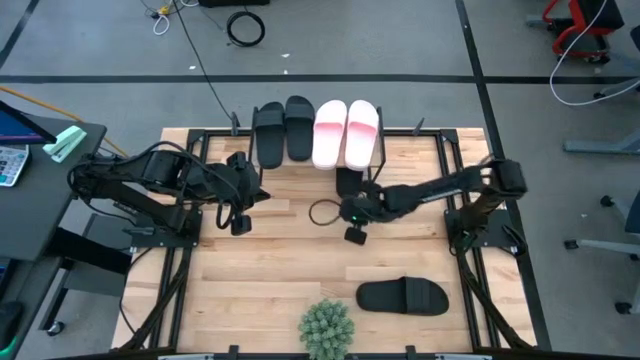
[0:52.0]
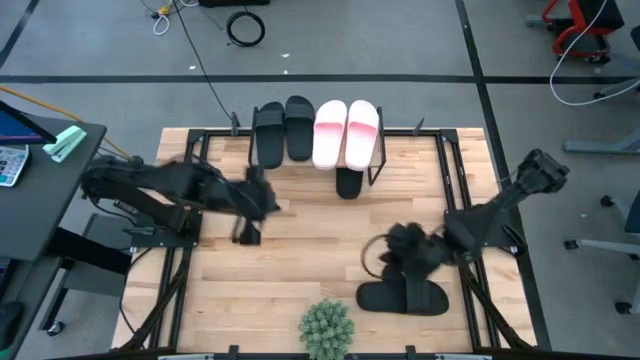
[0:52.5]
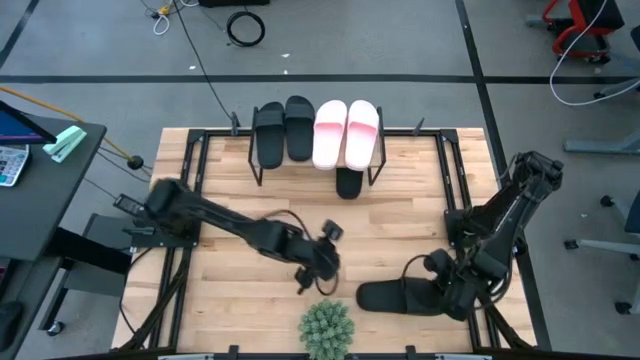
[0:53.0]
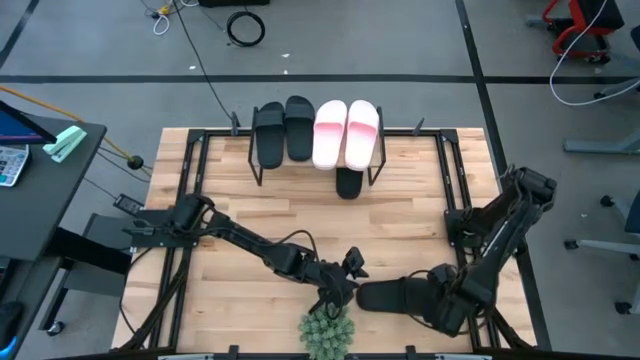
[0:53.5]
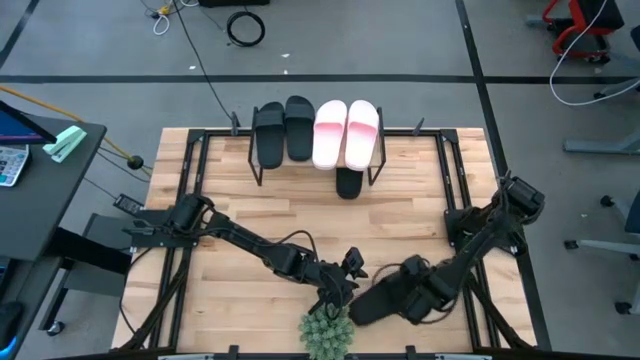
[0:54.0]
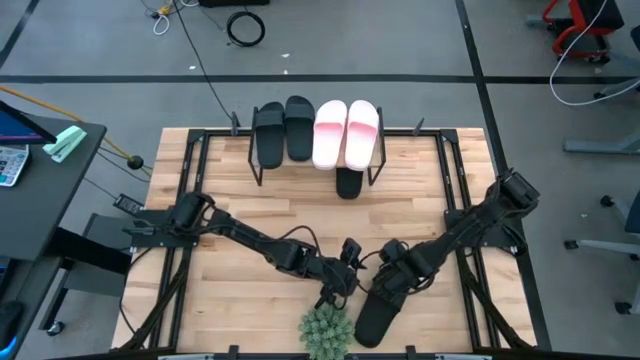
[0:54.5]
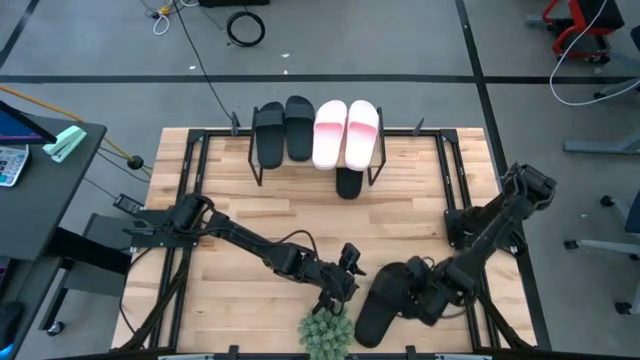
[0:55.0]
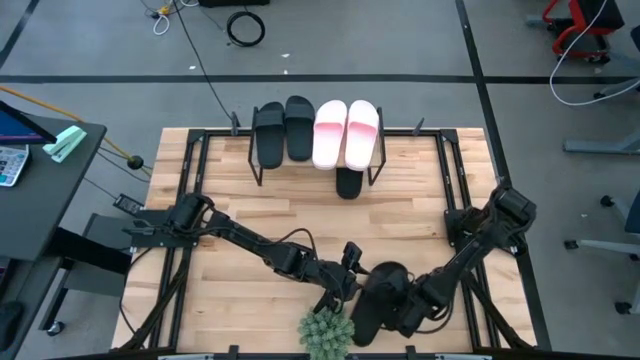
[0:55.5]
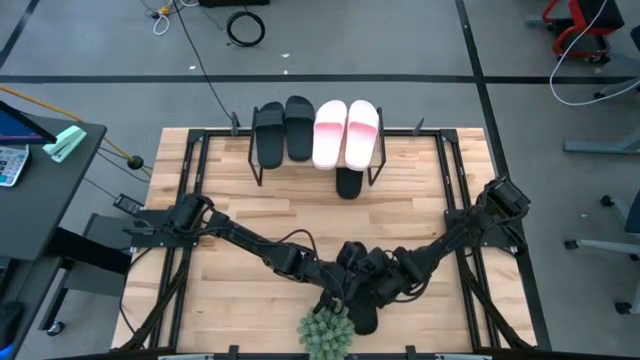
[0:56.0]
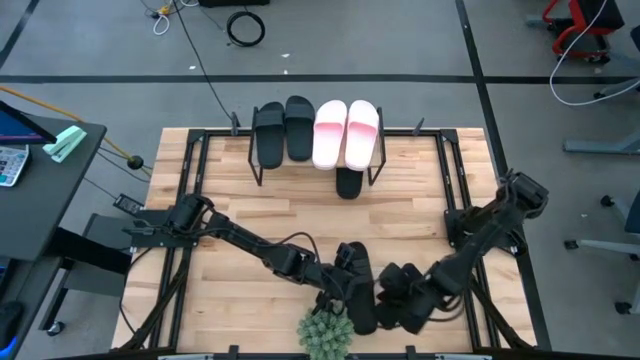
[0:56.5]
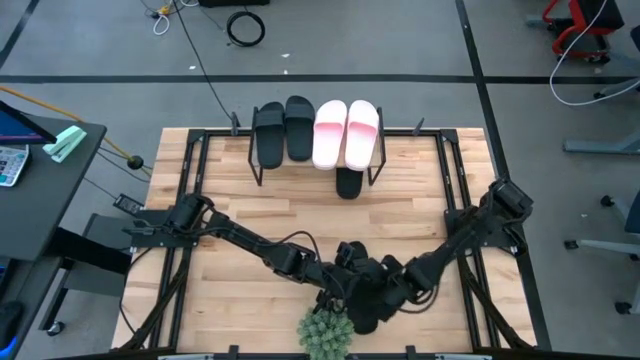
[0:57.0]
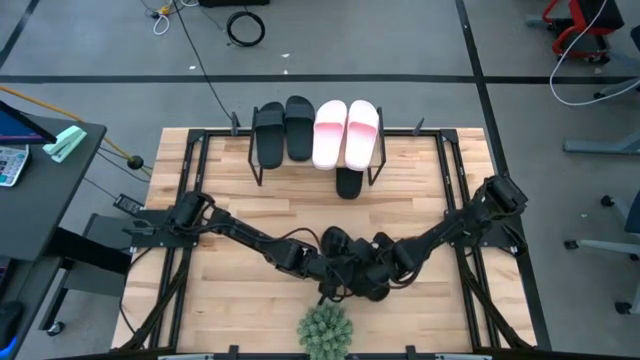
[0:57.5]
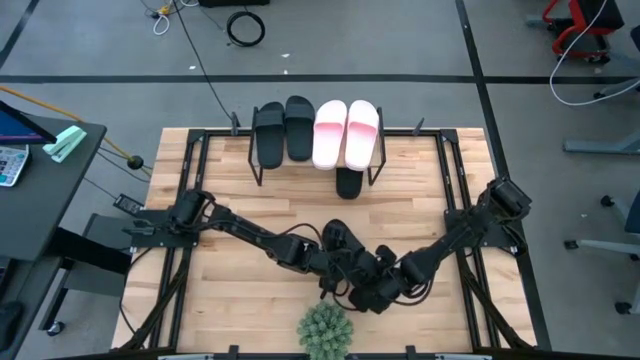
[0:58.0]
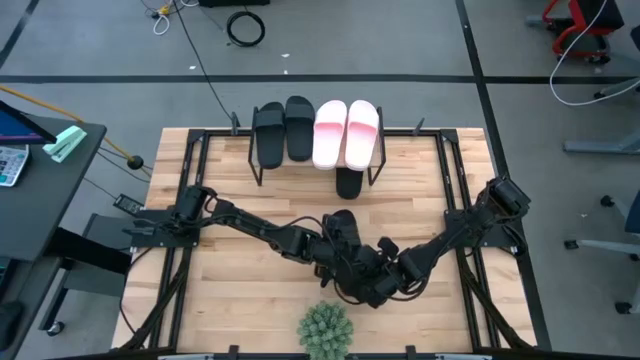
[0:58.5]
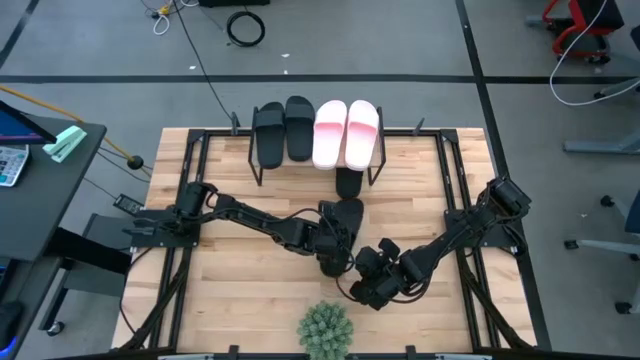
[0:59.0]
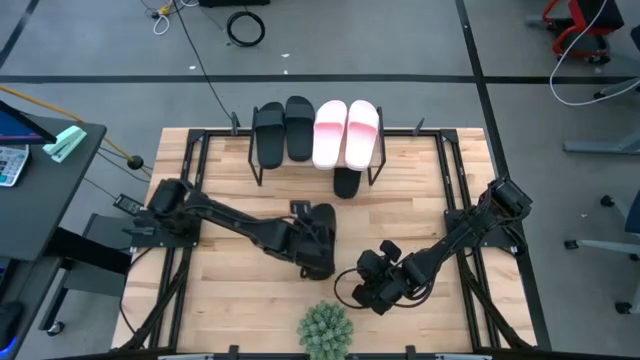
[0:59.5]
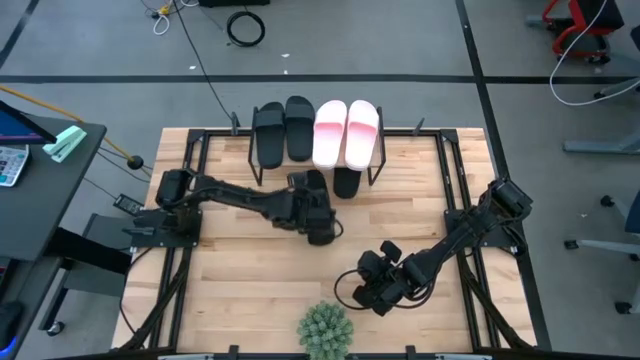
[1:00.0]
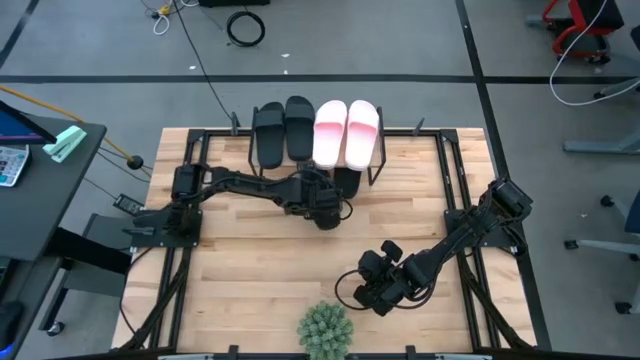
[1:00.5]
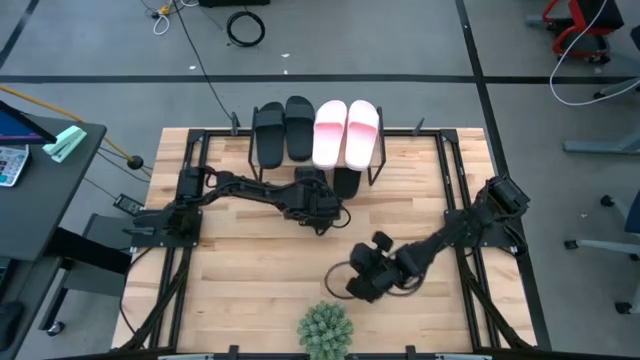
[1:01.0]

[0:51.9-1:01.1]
Task: Pick and place slides into the shelf
Put the black slides under the shelf

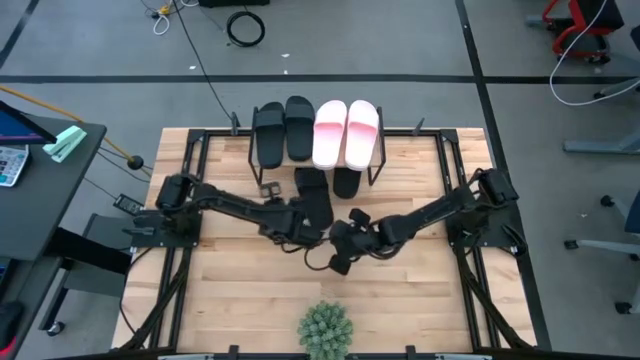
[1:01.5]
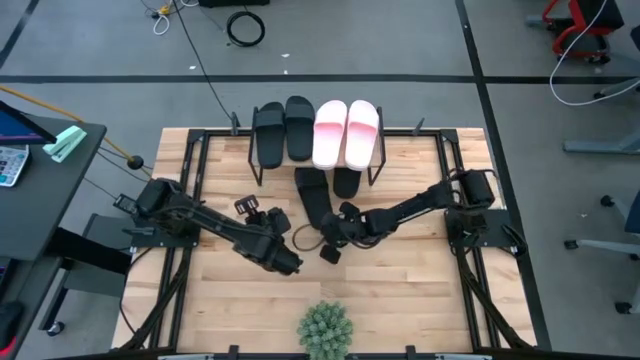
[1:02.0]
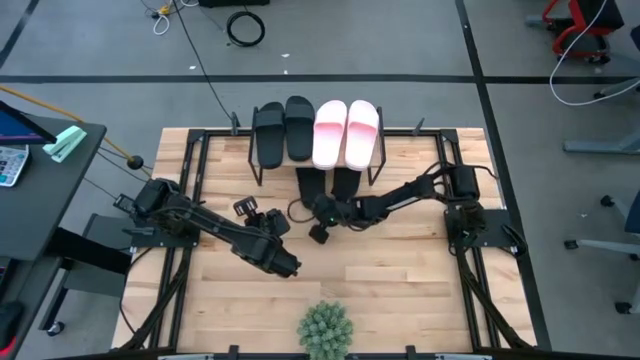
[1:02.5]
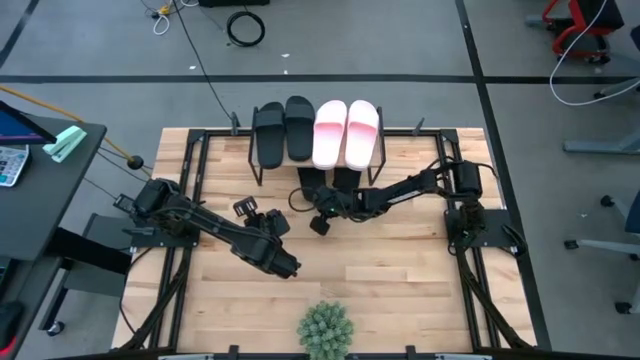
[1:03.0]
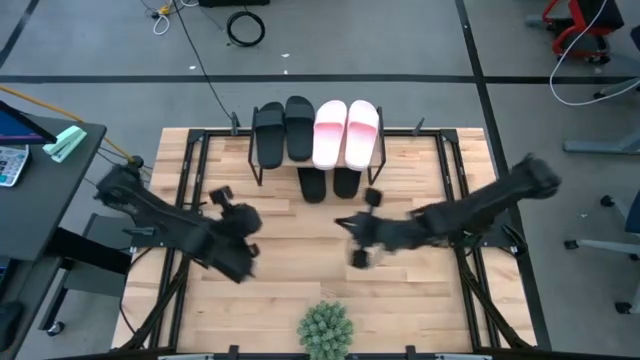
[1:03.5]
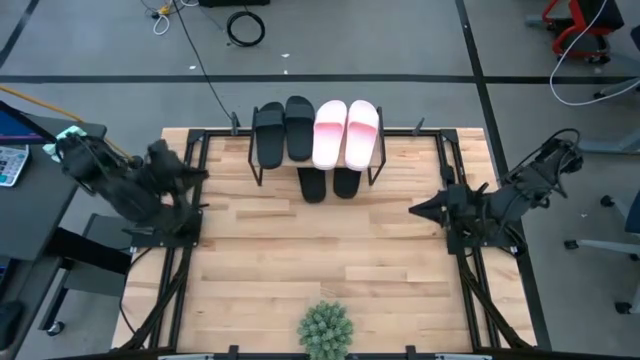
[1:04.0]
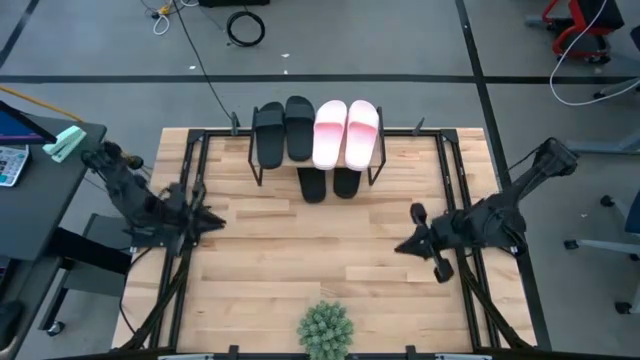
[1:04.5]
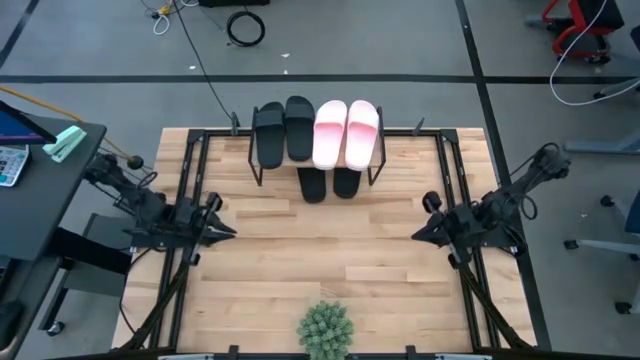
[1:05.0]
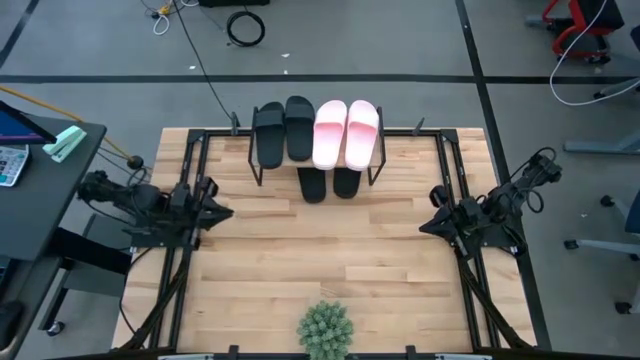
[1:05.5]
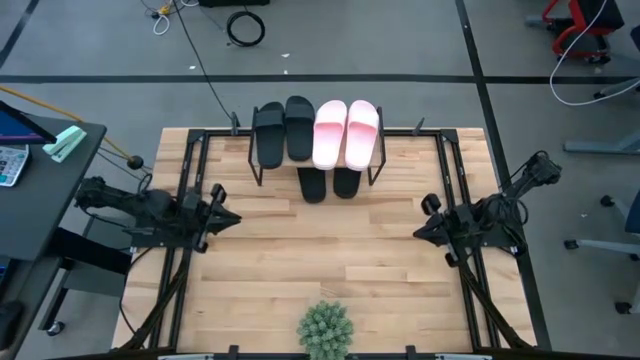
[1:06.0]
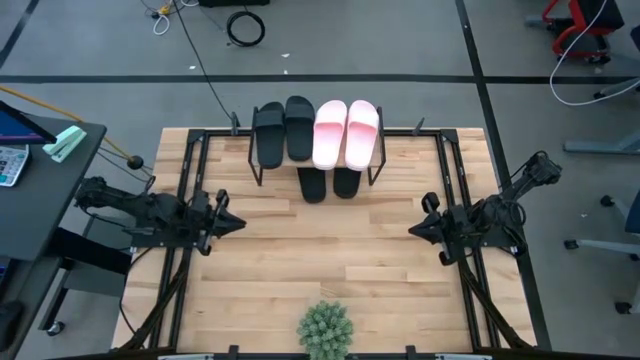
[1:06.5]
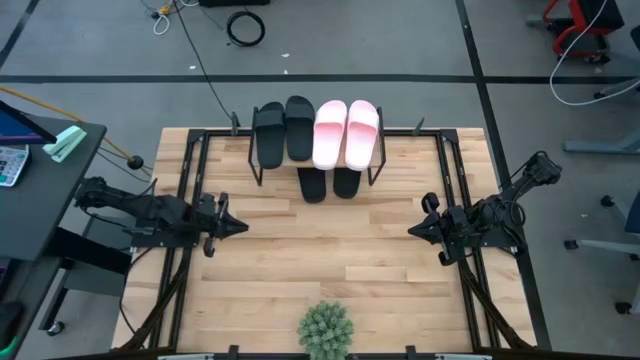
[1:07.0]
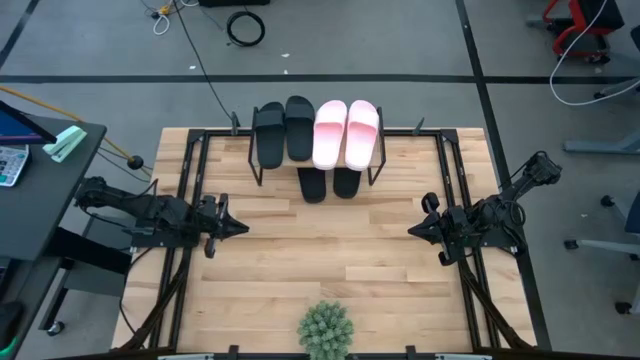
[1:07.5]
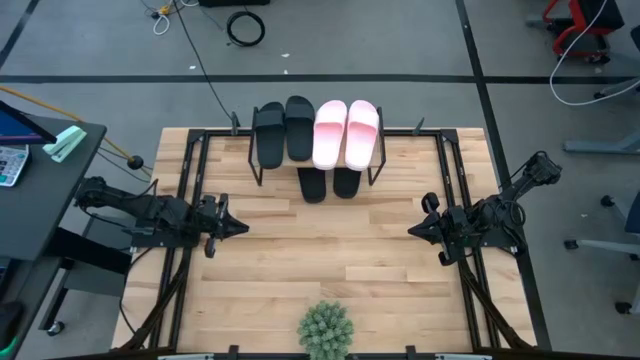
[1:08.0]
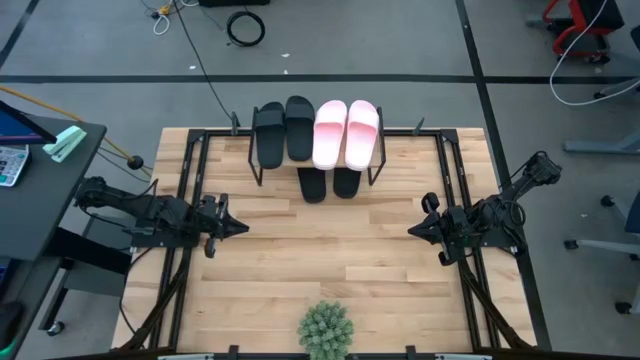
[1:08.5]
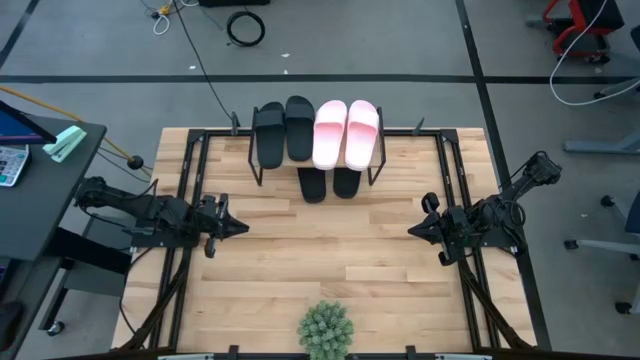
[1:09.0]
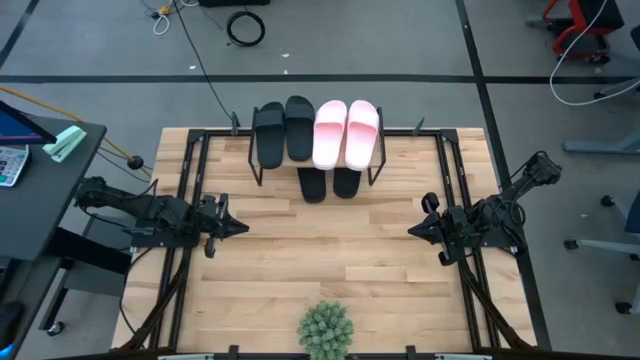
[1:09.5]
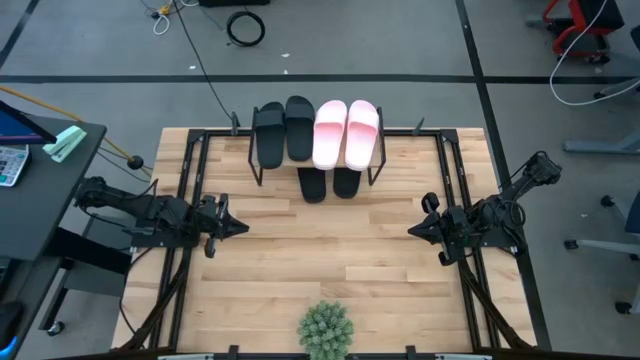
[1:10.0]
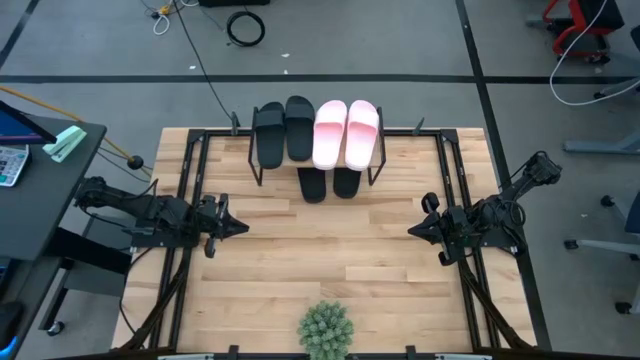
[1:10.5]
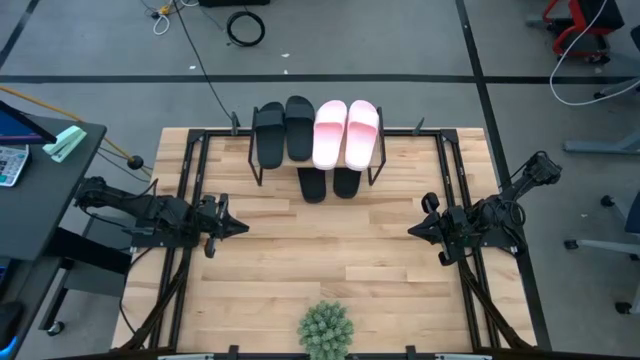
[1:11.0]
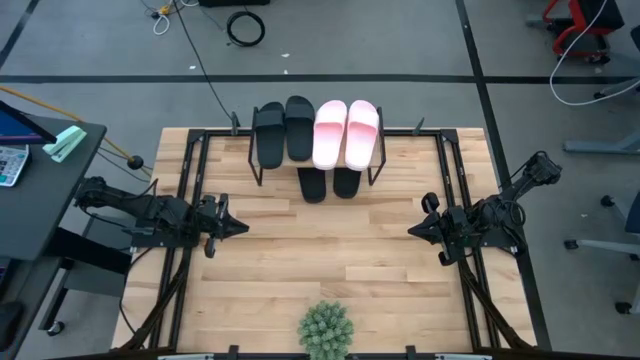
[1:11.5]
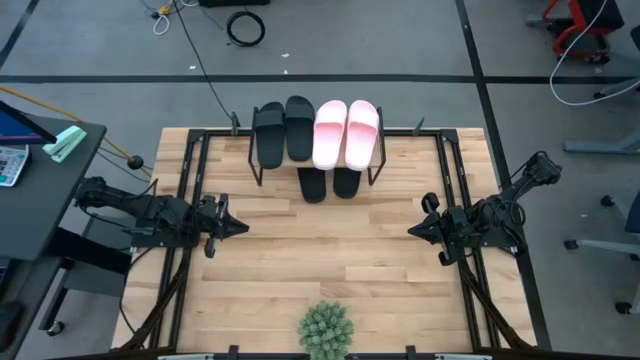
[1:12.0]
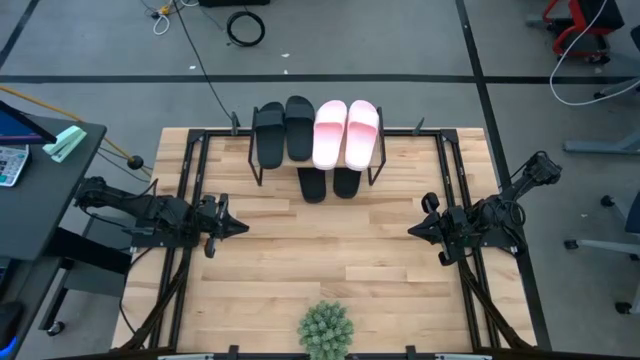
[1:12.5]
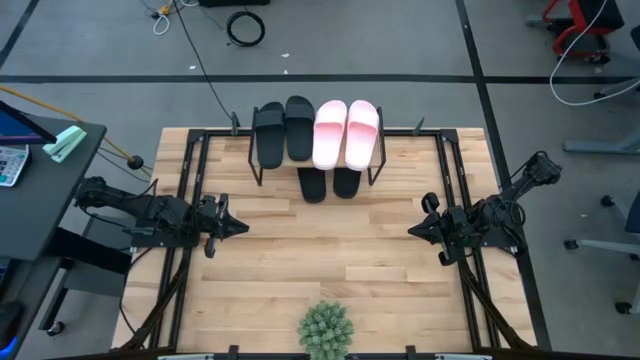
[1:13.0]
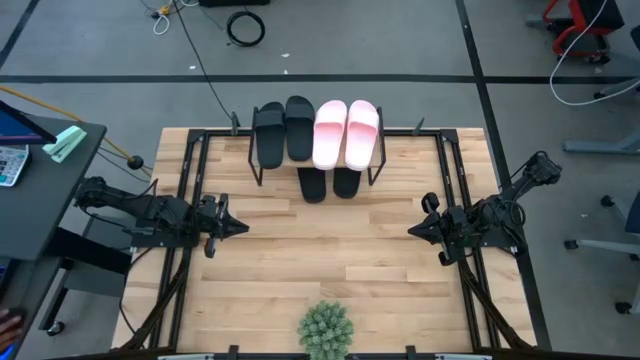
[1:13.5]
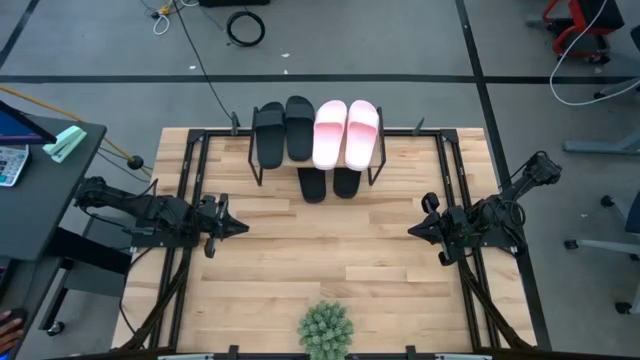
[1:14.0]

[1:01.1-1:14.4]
Return to Home Position
